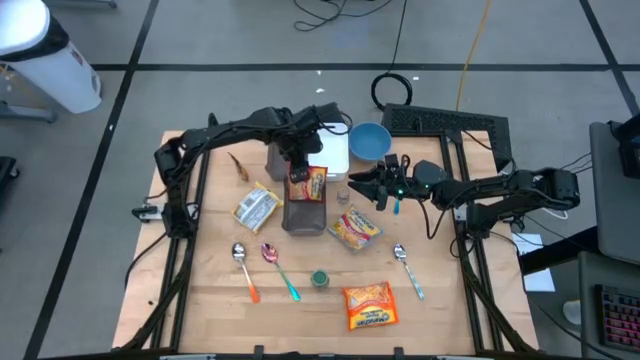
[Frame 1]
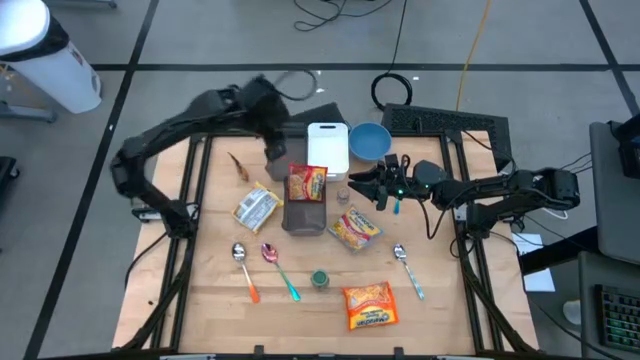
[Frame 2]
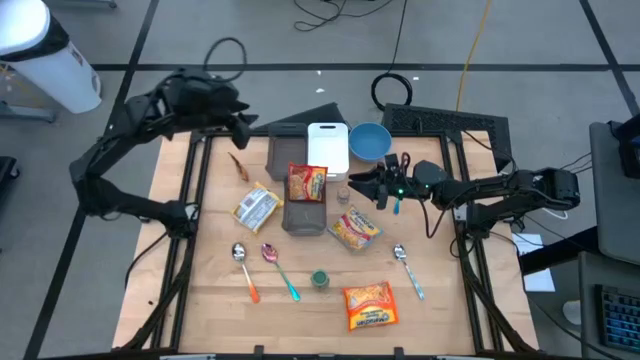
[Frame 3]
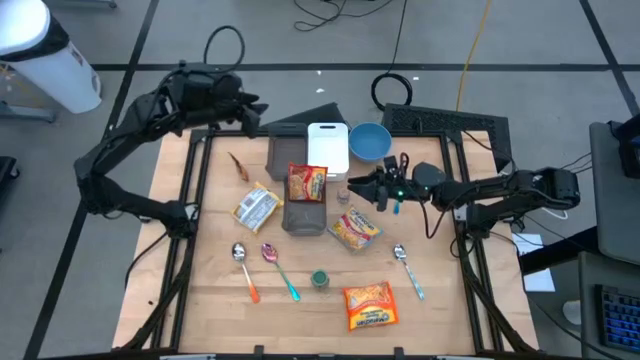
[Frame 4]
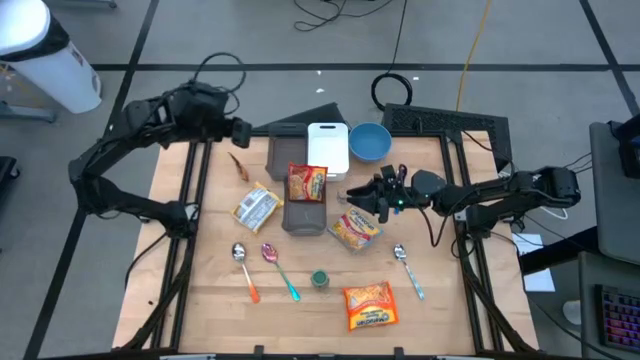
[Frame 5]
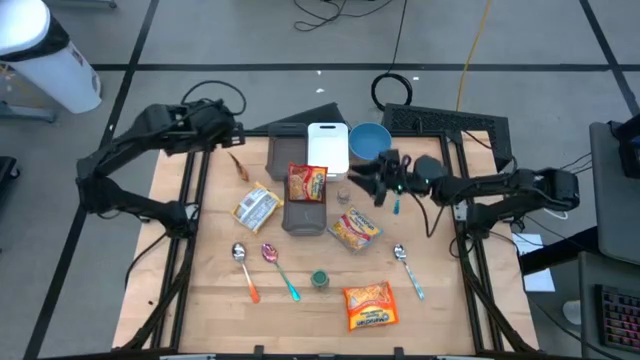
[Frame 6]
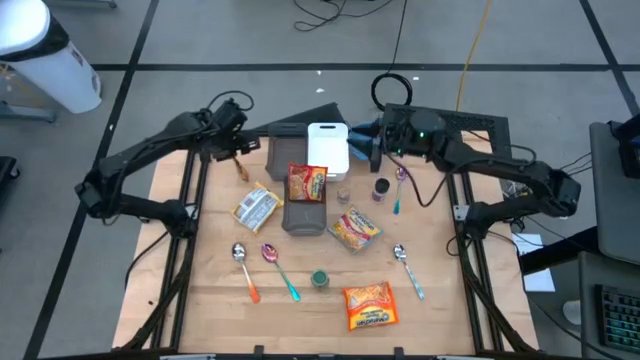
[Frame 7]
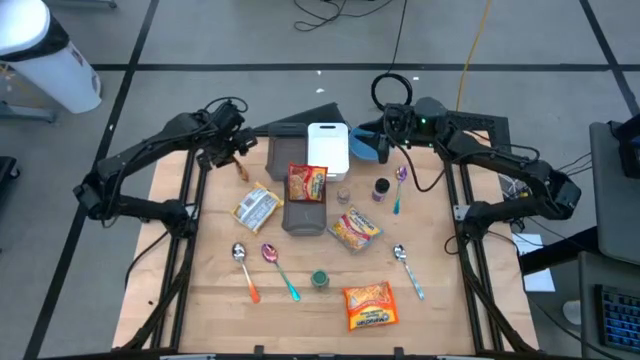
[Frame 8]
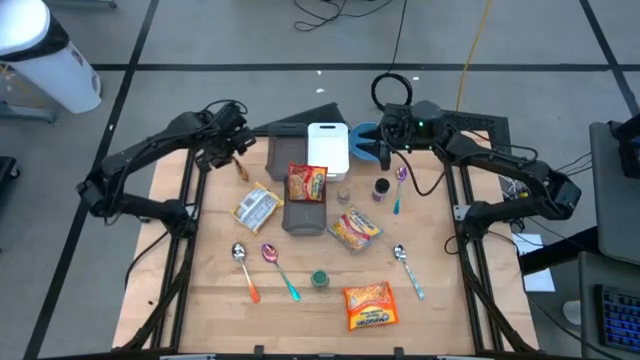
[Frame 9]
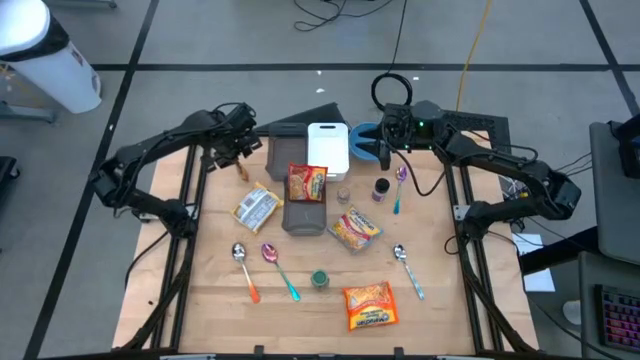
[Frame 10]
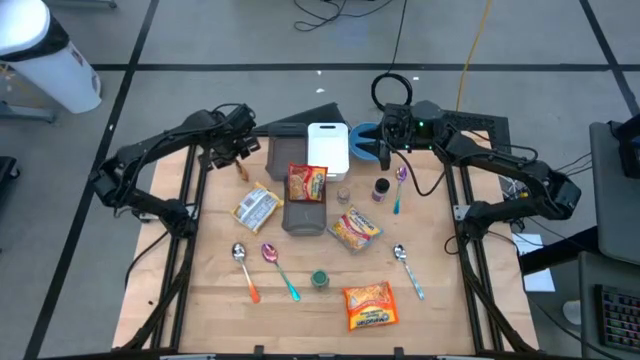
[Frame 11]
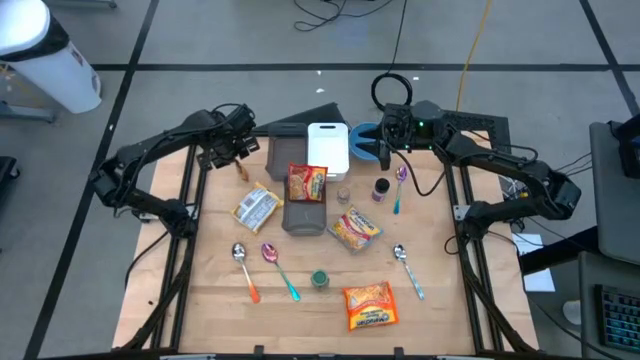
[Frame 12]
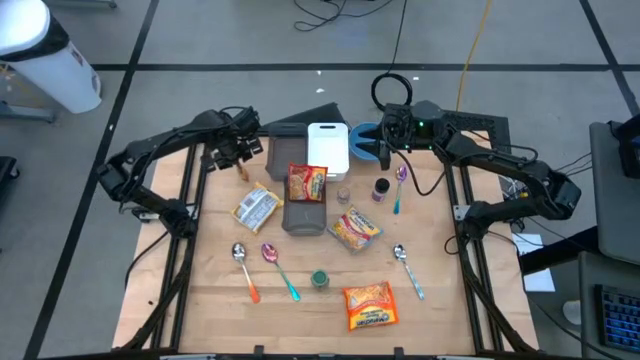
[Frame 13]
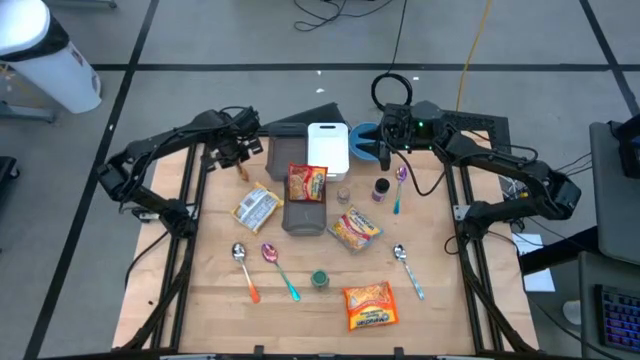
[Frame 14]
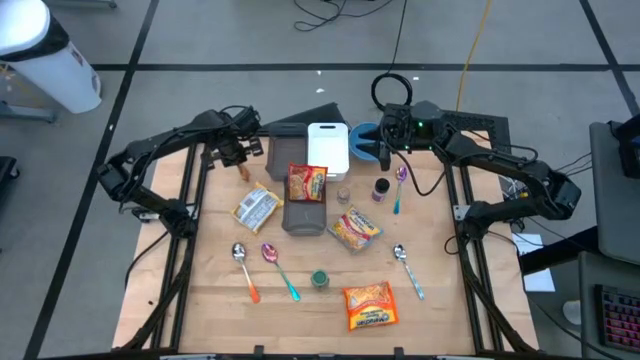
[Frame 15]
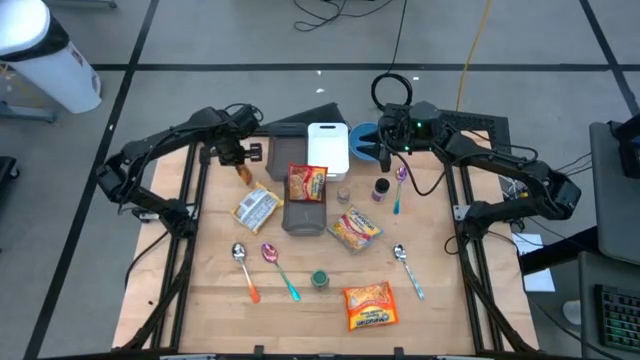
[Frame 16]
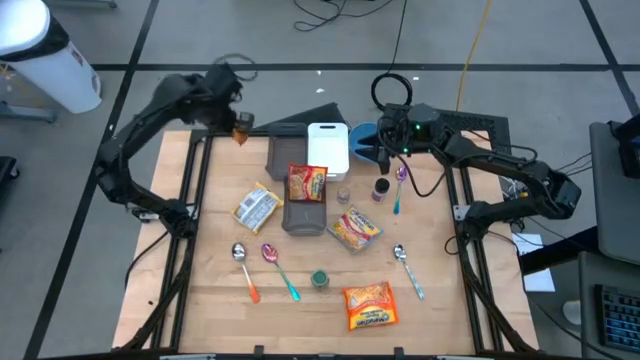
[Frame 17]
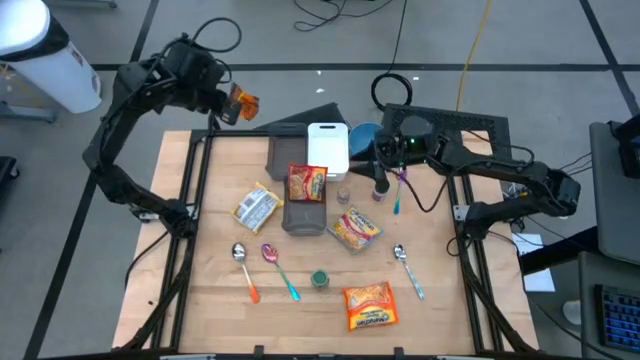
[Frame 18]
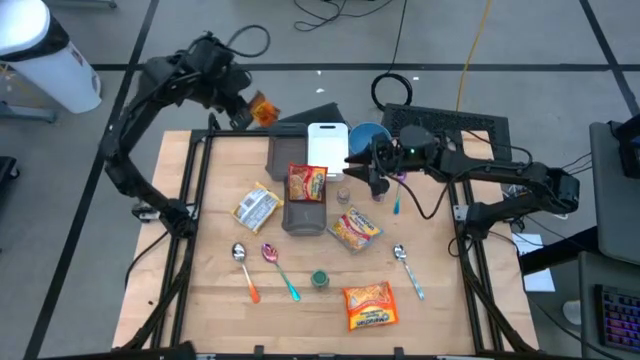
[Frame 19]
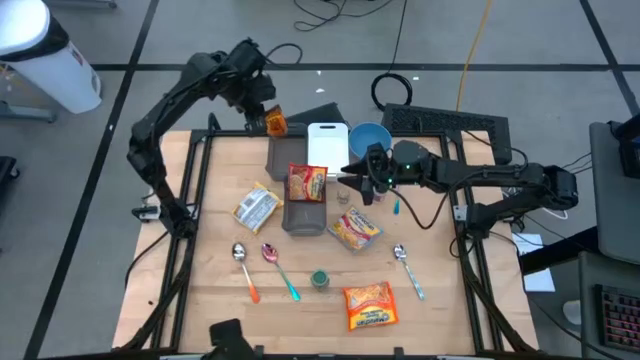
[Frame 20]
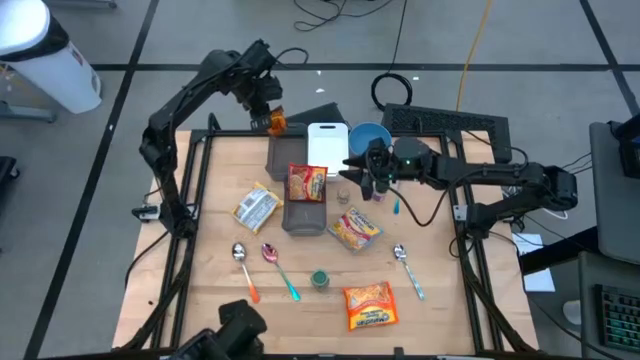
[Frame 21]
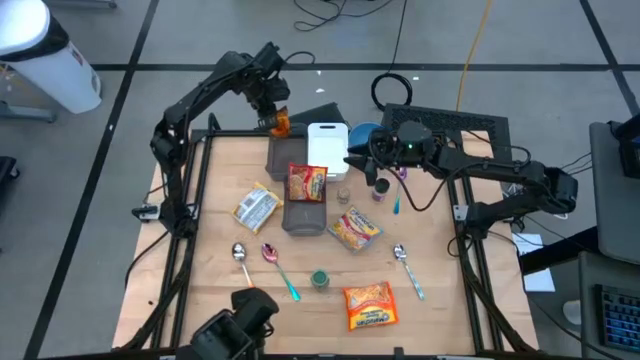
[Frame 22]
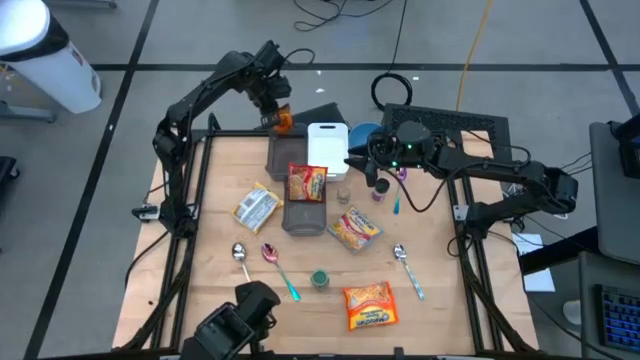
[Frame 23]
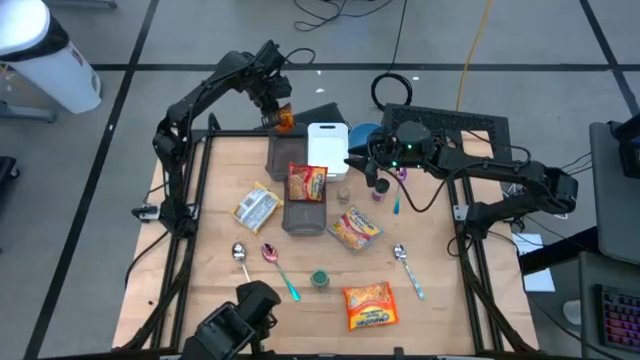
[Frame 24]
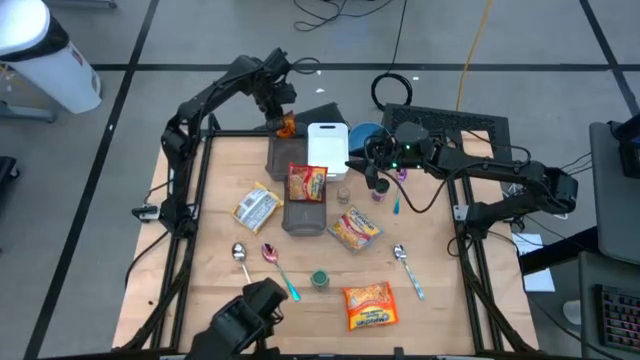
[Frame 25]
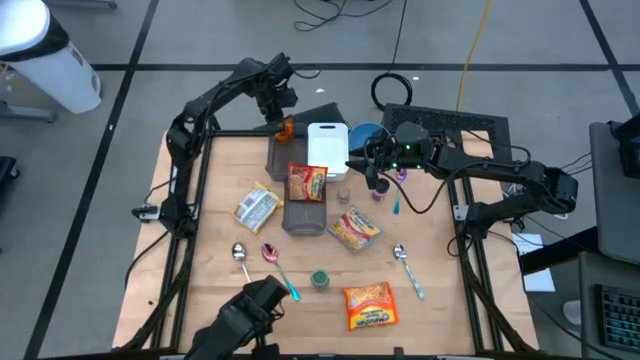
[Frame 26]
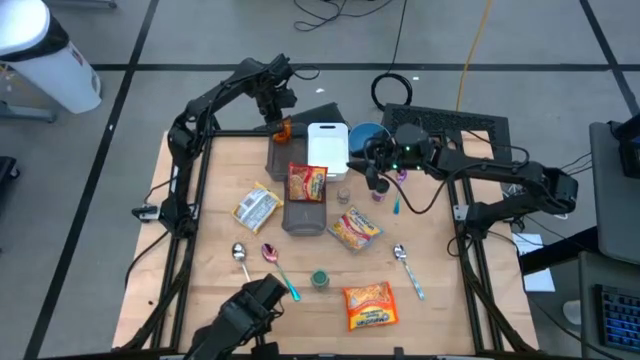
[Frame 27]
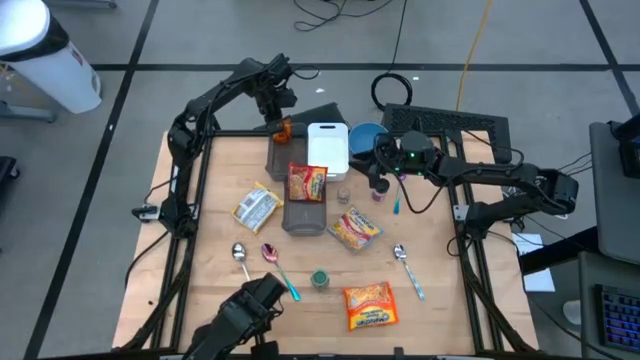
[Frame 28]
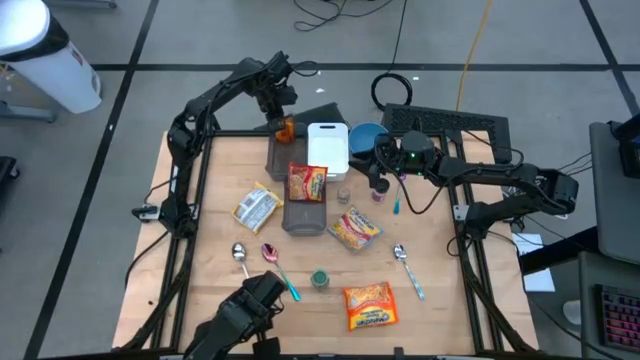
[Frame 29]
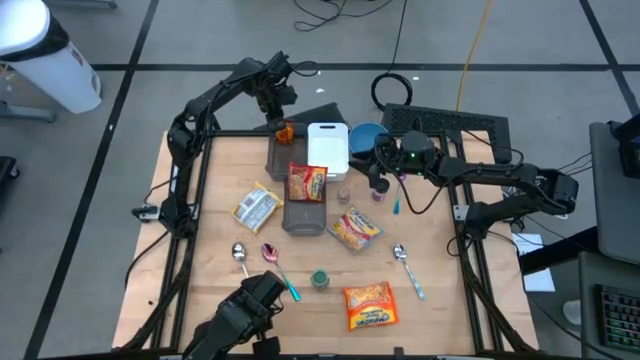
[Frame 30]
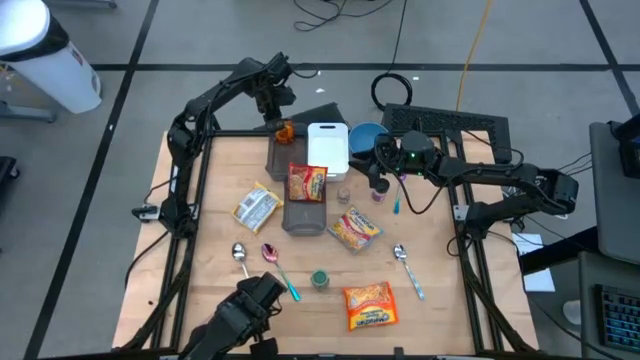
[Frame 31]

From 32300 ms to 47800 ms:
Task: Pick & Place Food Item
Put the orange spice pack into the top black bin

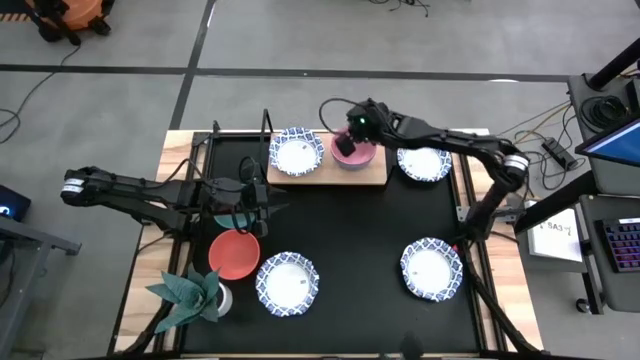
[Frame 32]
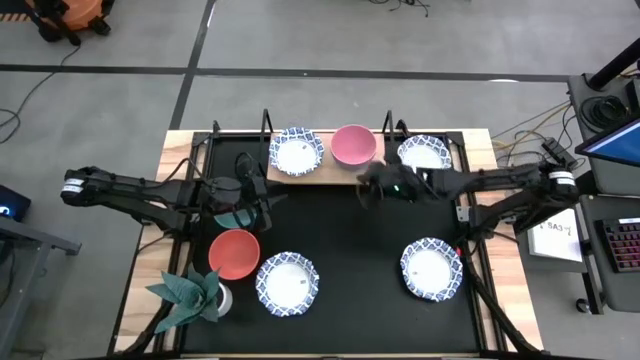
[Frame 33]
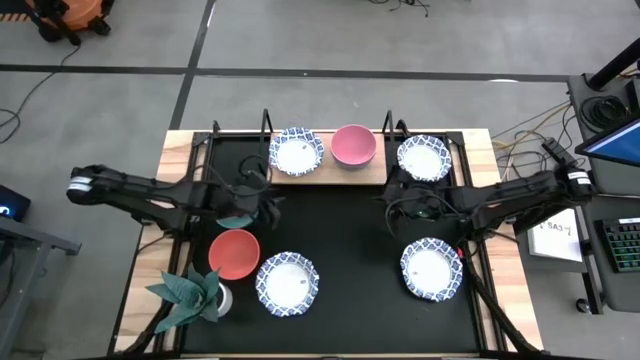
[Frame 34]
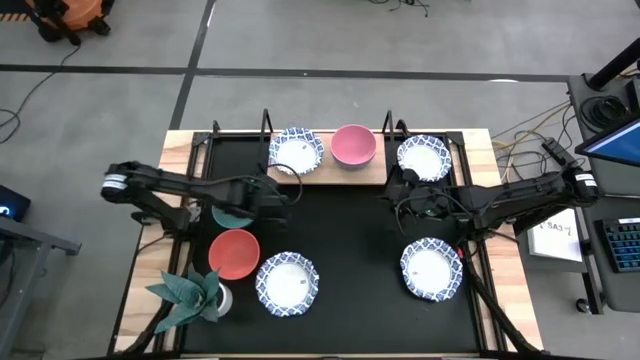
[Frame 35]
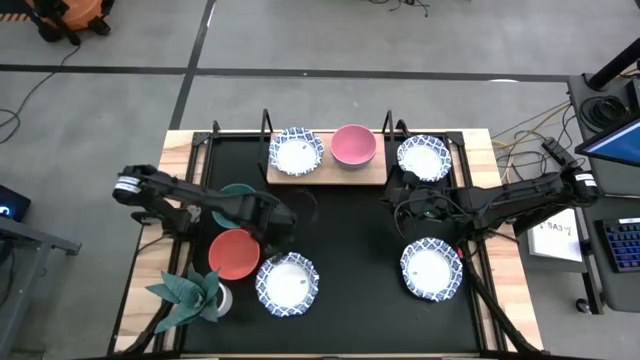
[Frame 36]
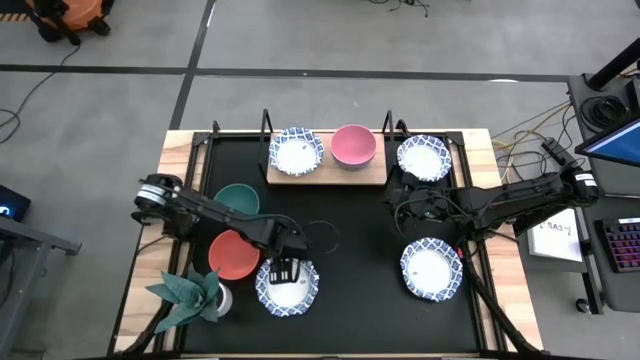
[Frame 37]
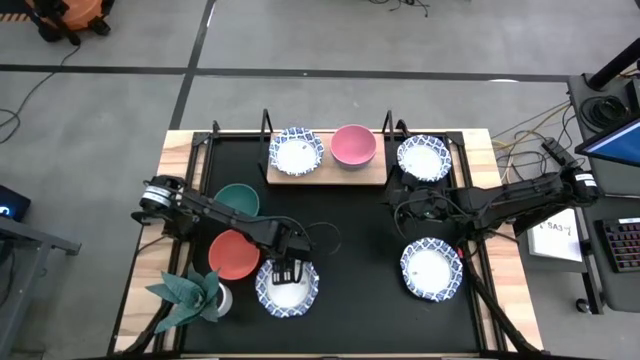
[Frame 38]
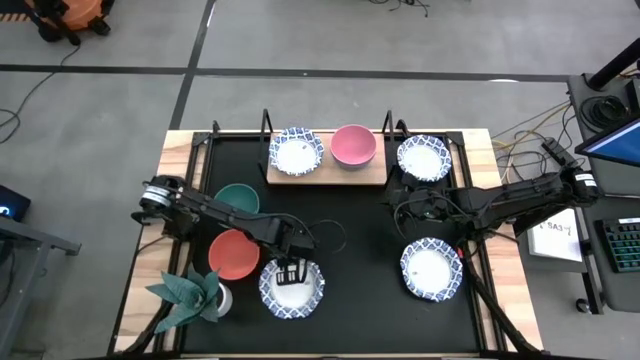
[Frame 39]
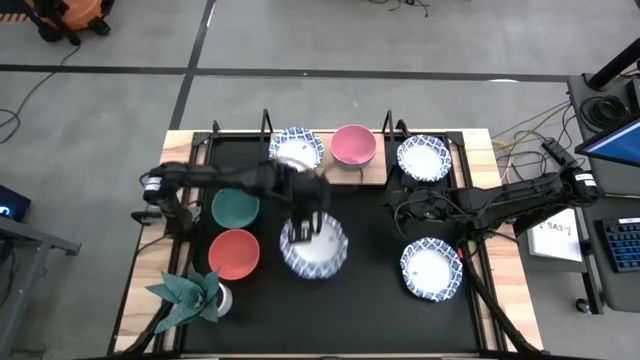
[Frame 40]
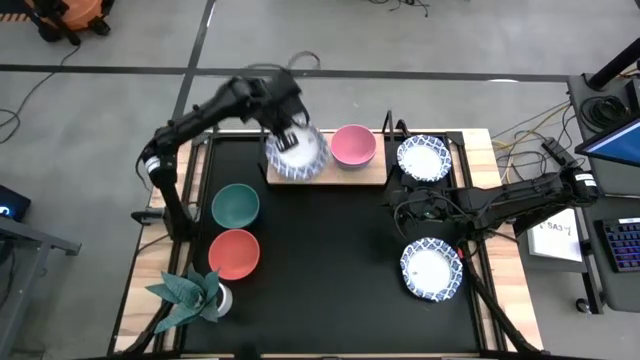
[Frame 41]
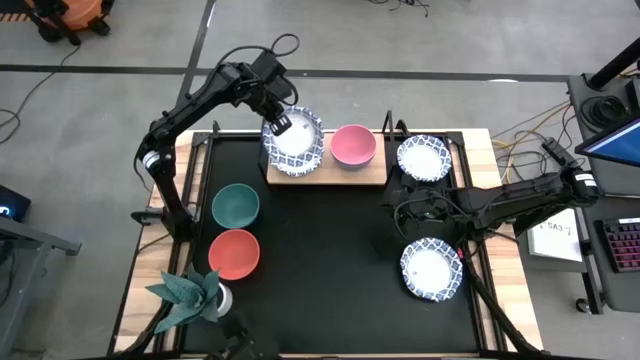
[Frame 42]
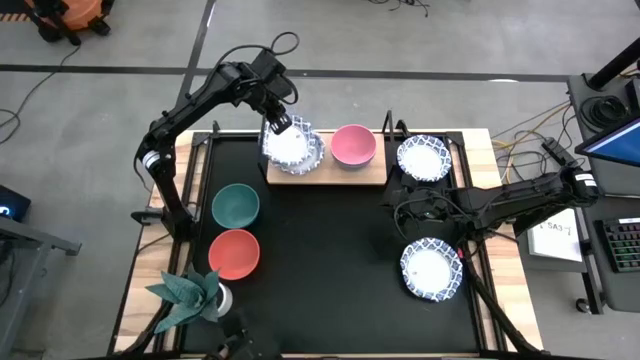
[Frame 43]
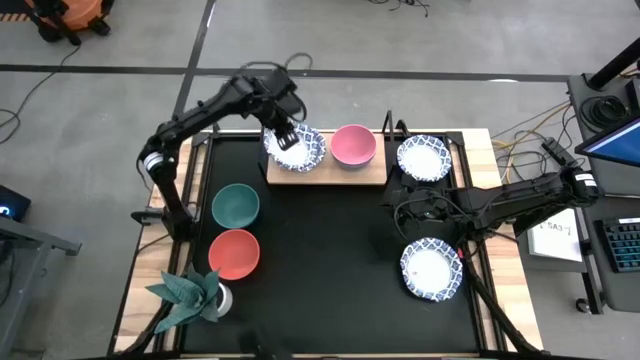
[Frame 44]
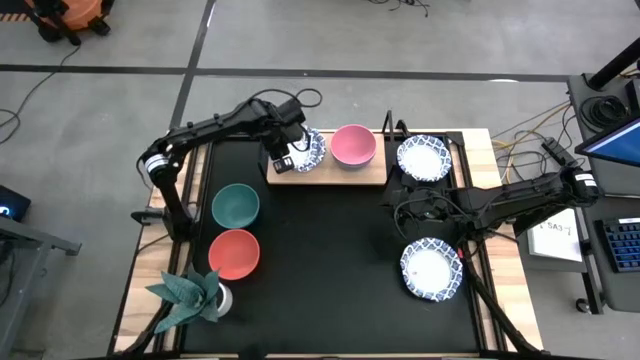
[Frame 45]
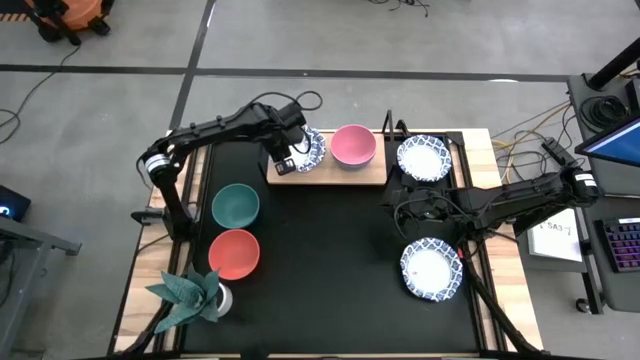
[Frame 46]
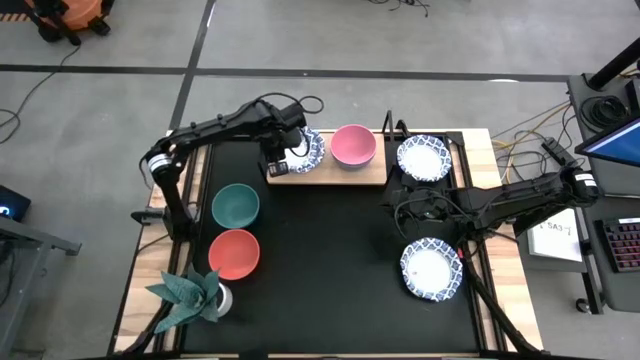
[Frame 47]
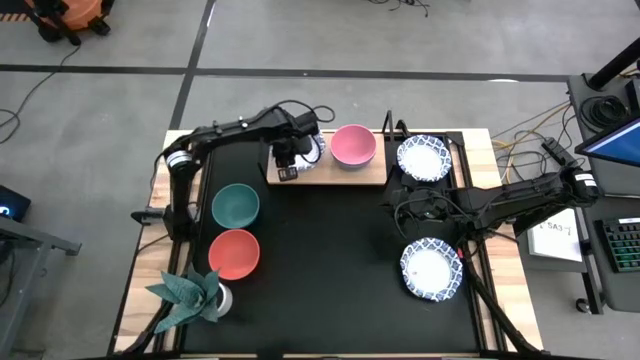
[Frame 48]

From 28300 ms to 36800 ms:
Task: Place and stack bowls onto a shelf
Stack the white bowl on the top of the other white bowl on the shelf
